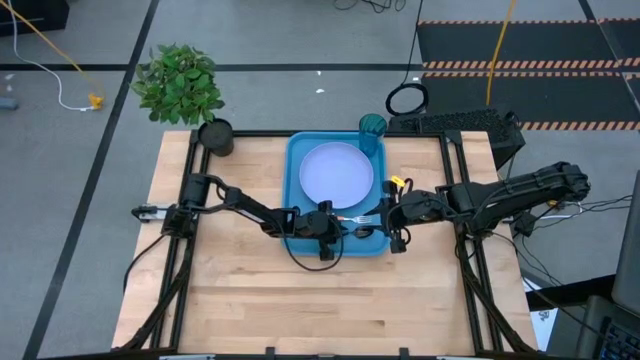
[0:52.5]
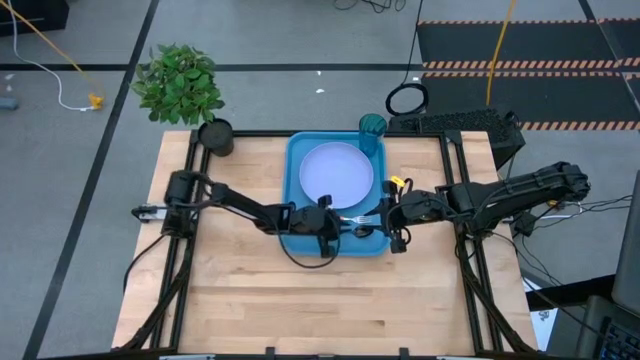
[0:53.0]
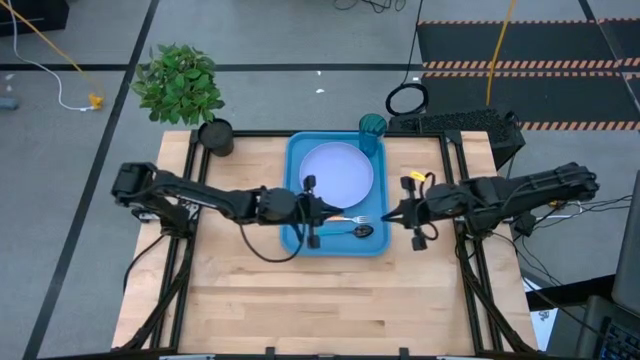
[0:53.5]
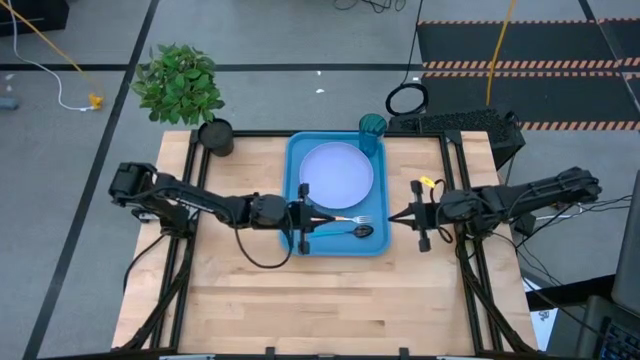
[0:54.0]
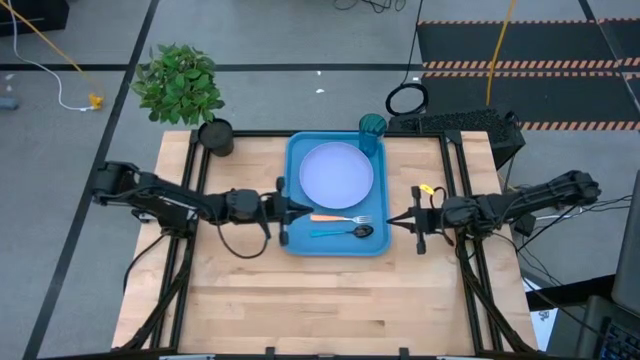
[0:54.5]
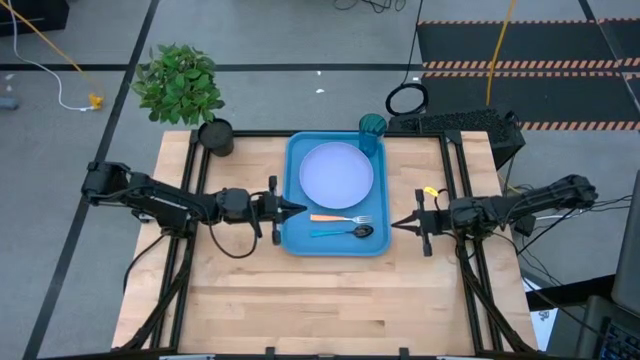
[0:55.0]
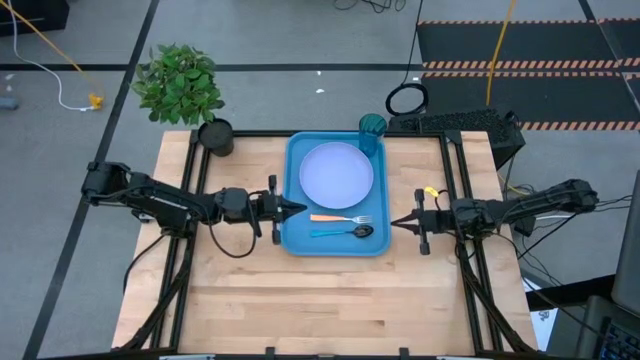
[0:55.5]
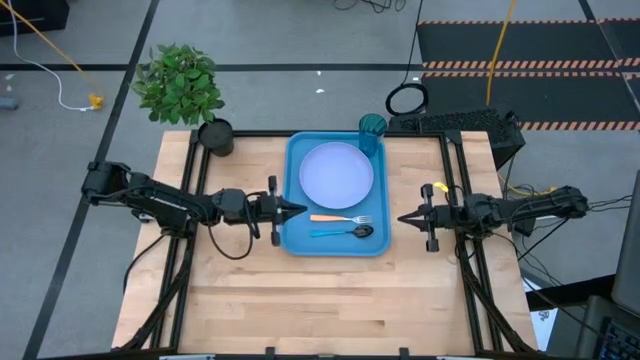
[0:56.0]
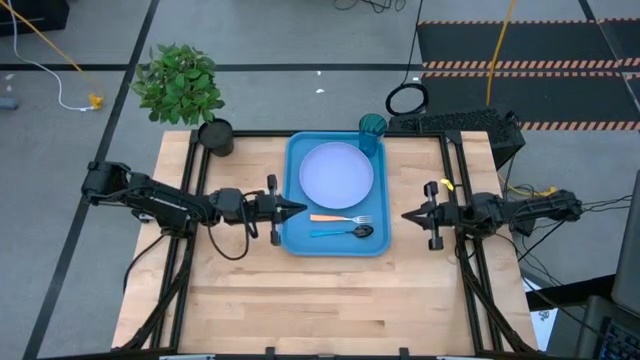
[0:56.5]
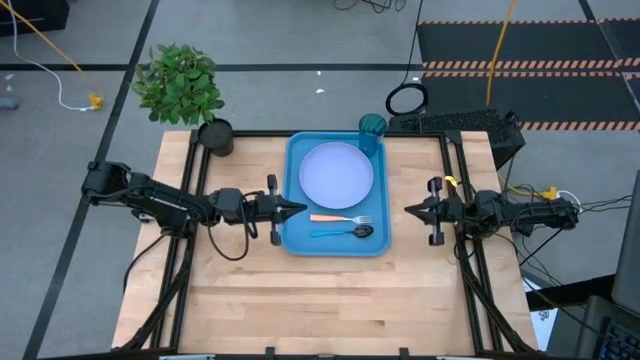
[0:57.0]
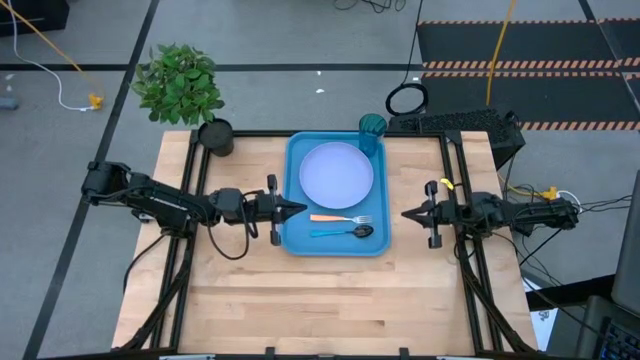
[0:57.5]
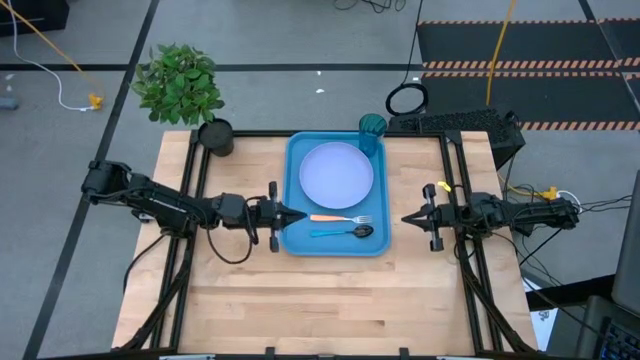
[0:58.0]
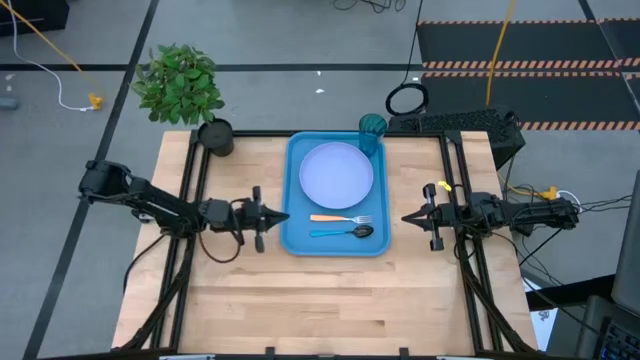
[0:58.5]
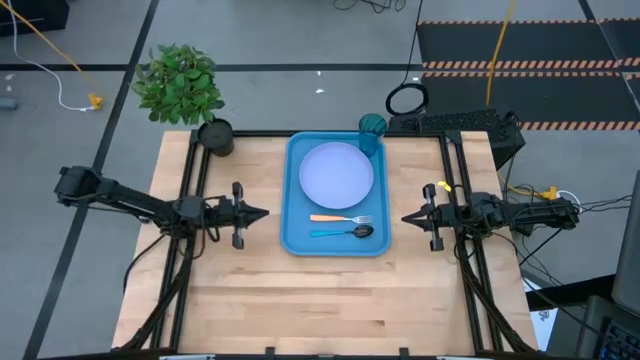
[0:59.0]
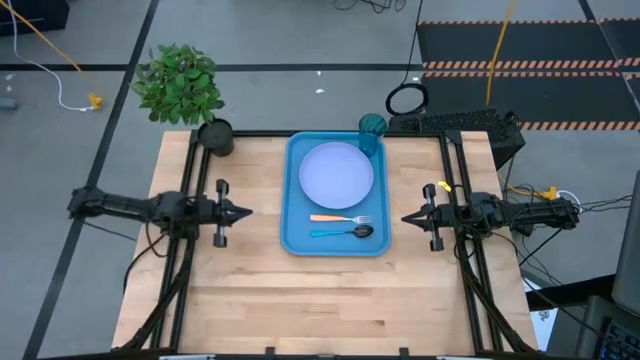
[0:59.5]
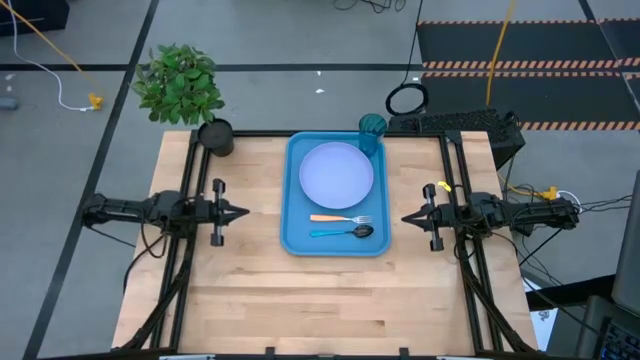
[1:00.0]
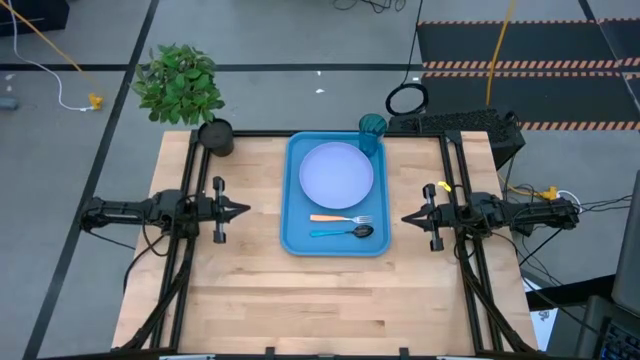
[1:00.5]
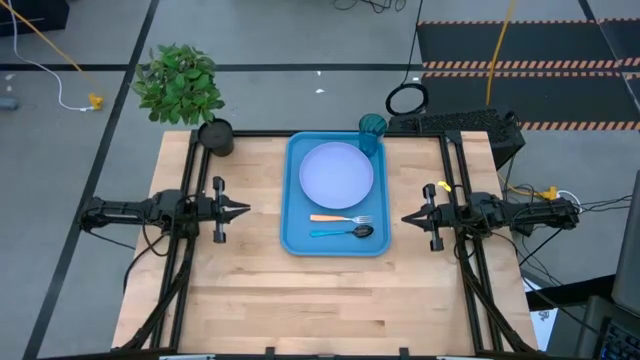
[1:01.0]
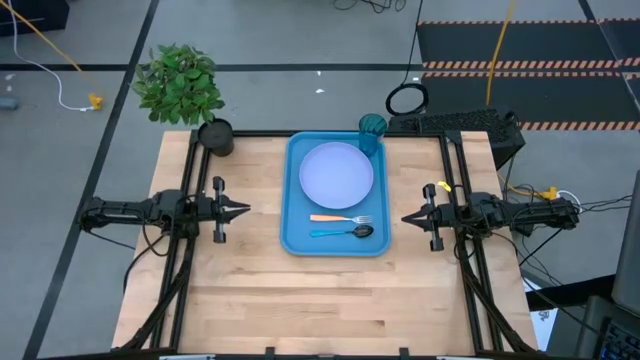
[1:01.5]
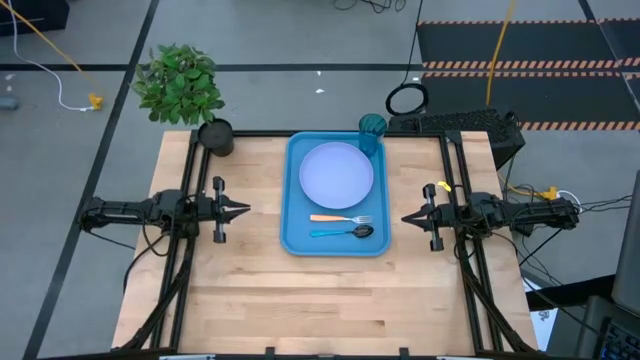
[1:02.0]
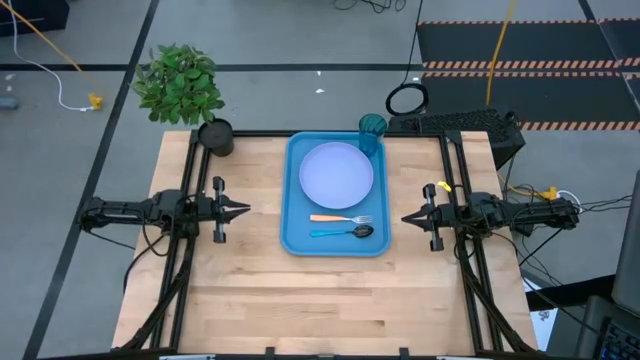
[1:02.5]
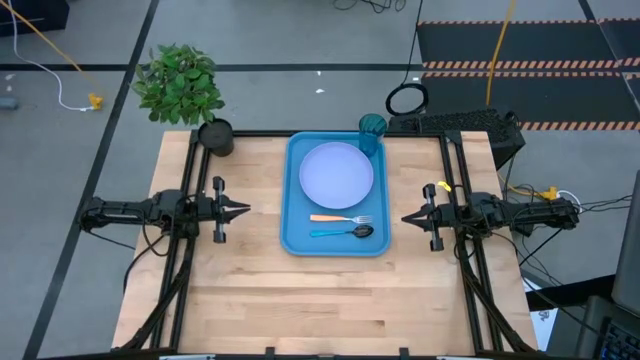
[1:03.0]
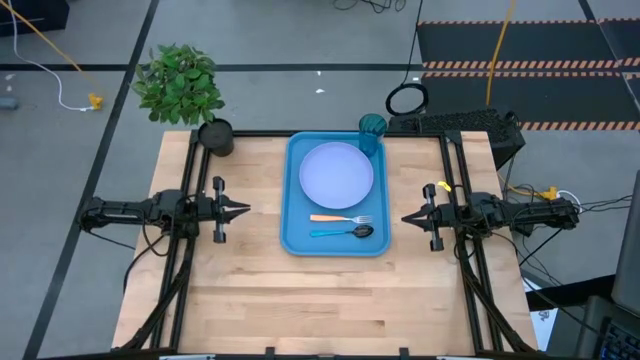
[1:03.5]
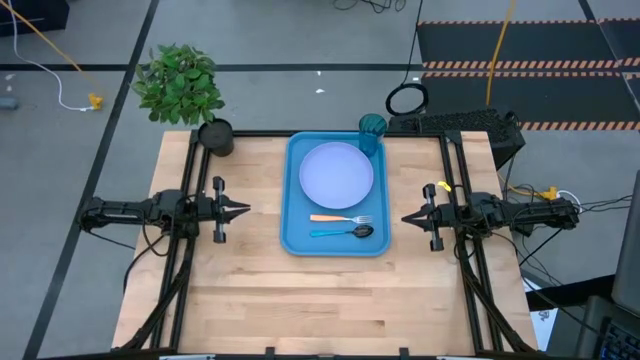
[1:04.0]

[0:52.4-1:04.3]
Task: Pick and place plate/cup/fork/spoon on tray
Return to Home Position

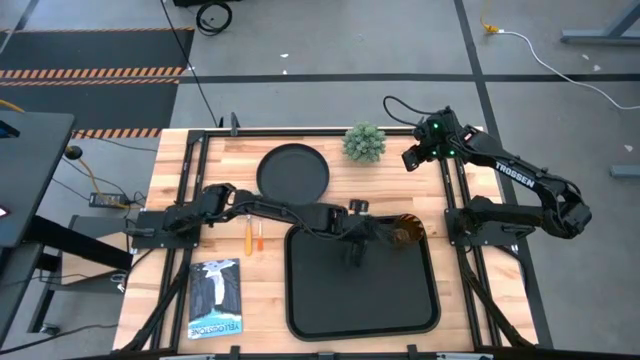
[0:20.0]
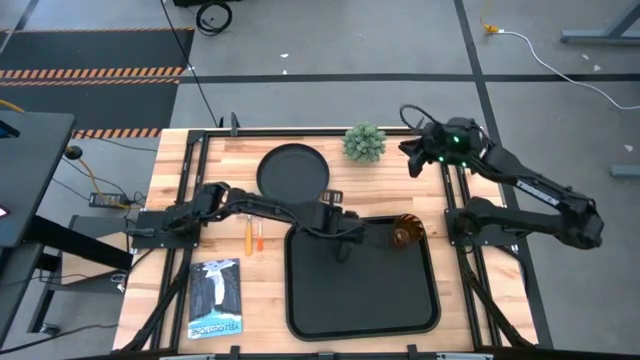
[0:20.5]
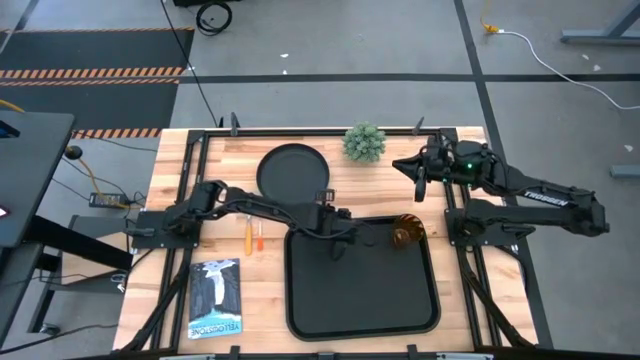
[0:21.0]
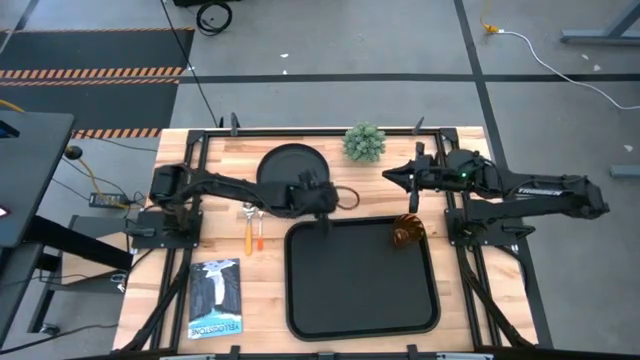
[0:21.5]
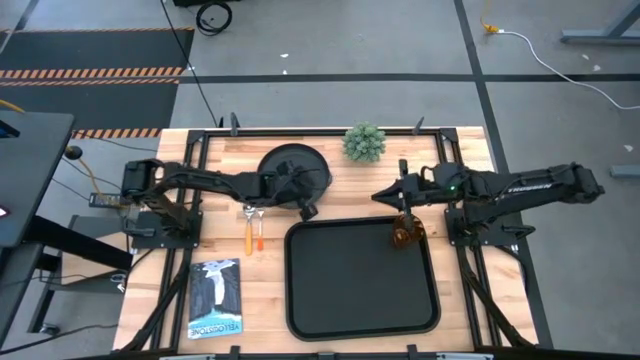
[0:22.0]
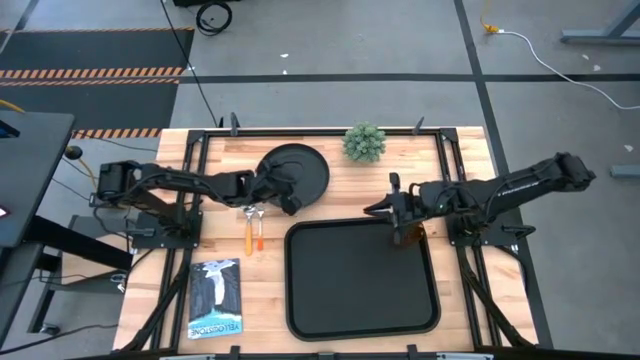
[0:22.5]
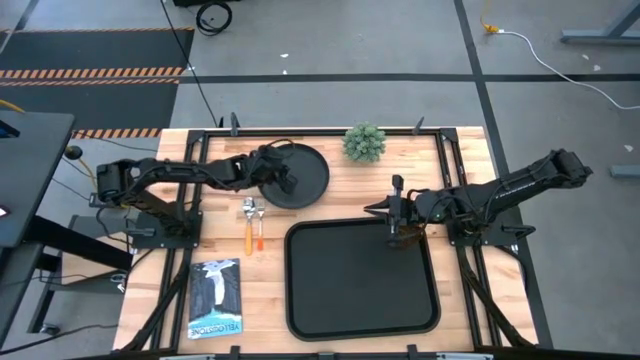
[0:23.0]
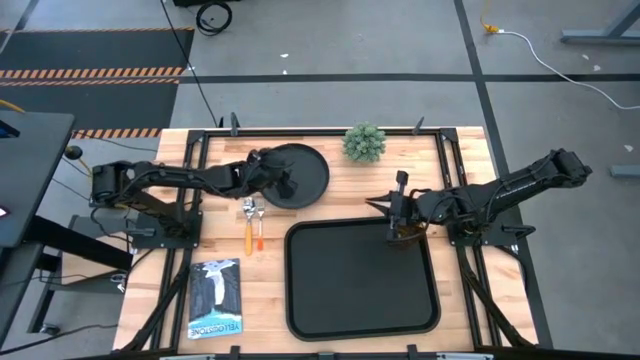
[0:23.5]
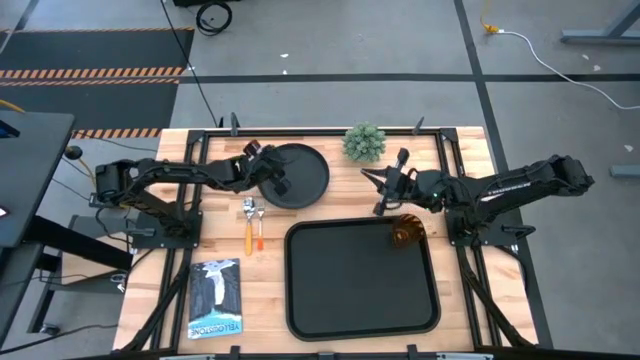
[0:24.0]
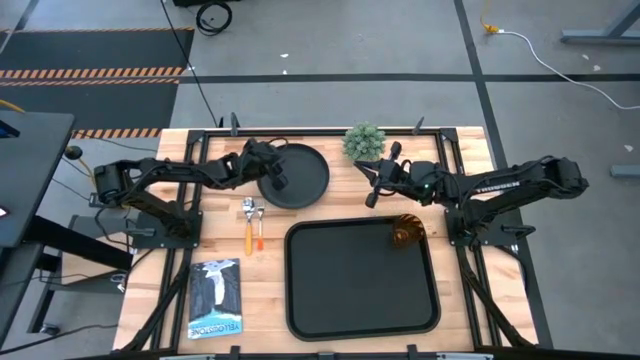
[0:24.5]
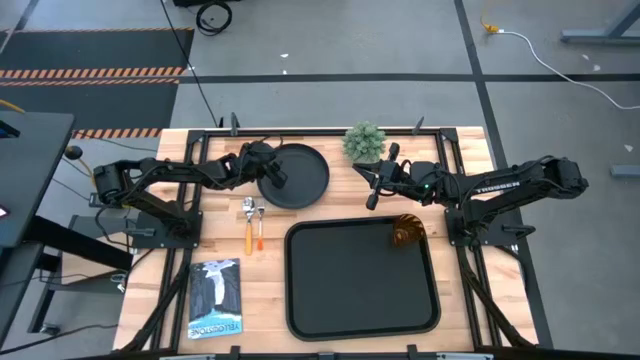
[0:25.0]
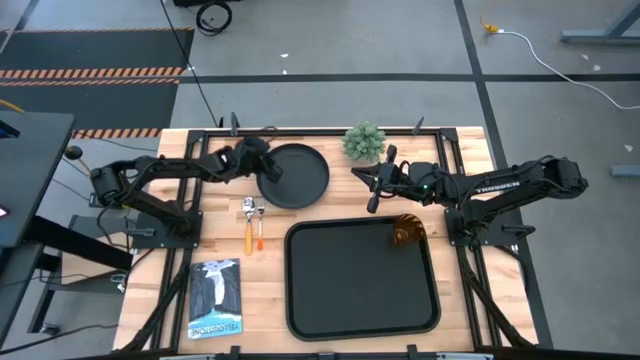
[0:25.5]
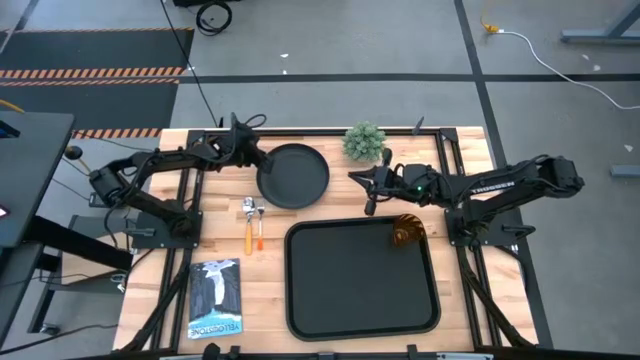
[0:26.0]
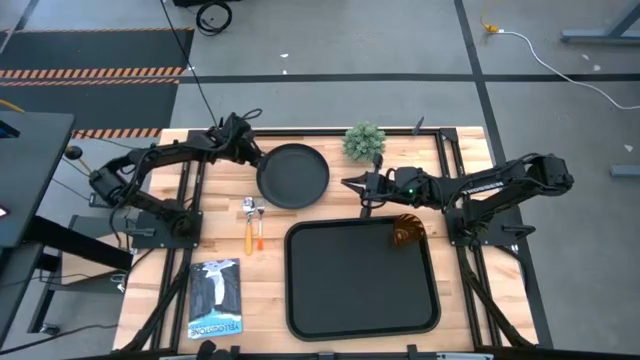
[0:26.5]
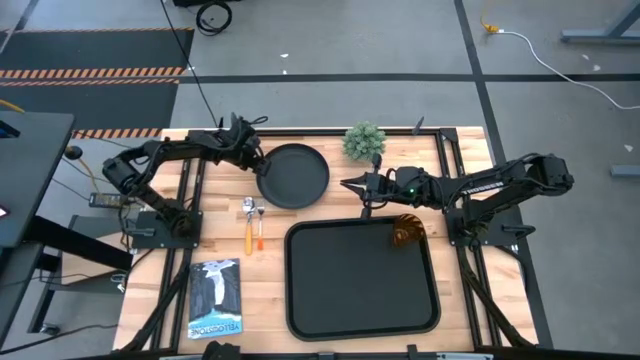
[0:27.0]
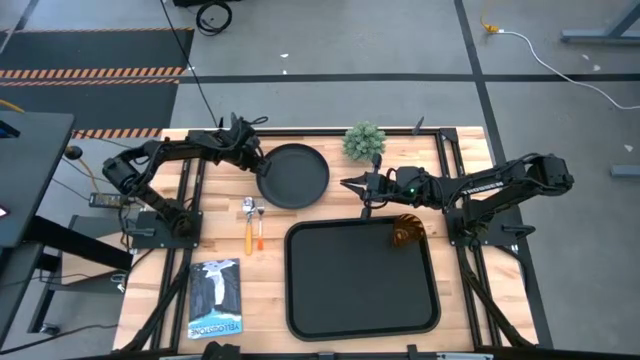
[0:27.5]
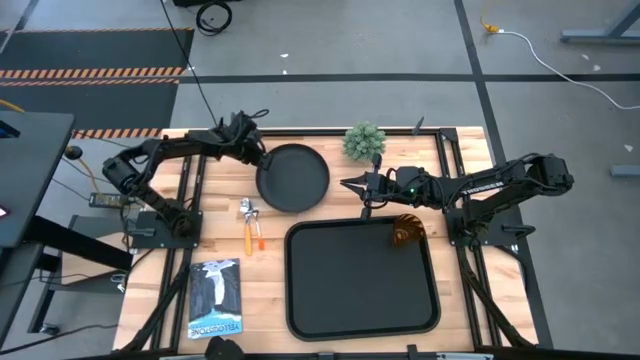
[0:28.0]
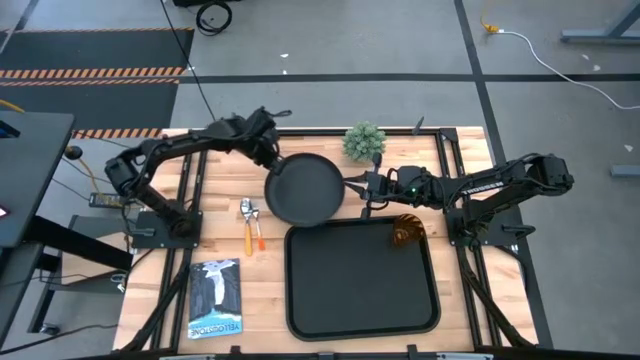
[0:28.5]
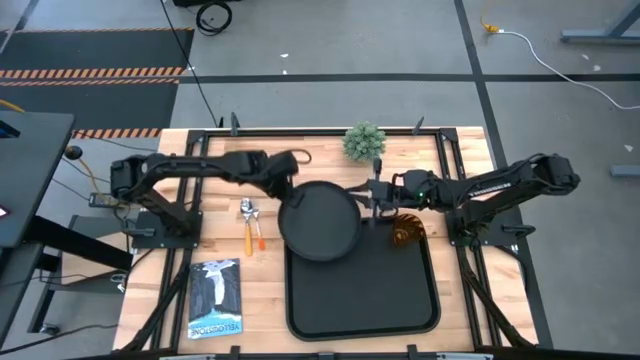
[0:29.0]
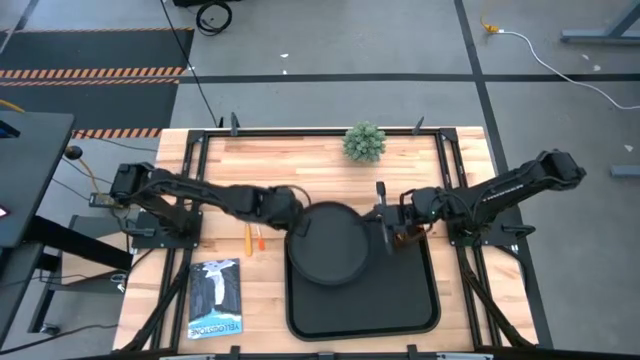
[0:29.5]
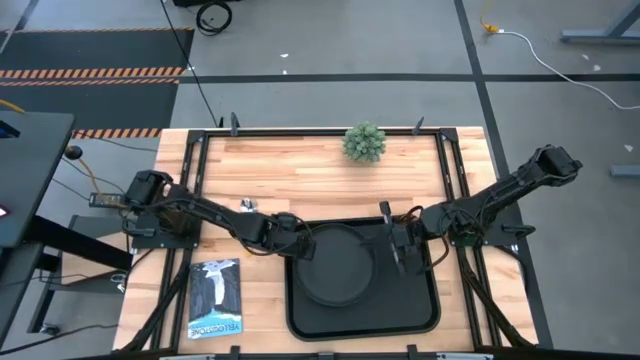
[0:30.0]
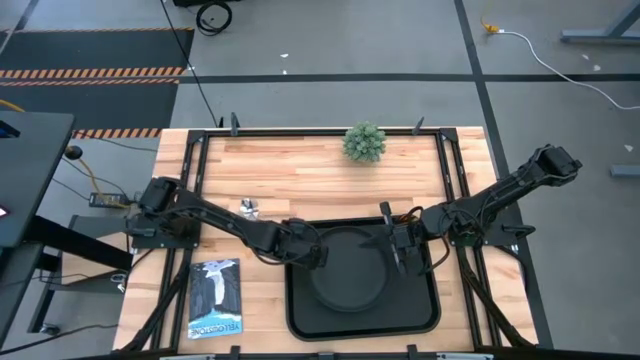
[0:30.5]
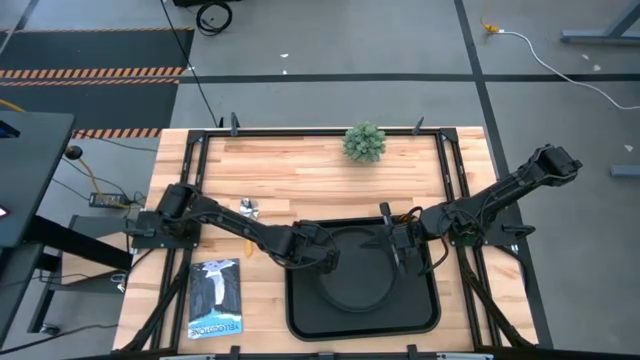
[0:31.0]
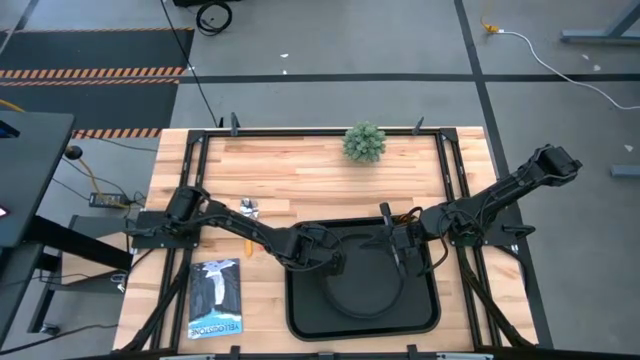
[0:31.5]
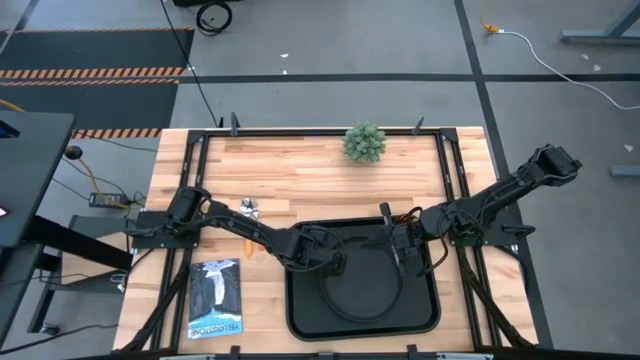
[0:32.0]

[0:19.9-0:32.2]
Task: Pick and place plate/cup/fork/spoon on tray
Put the black plate on the black serving tray to the bottom left of the brown cup
